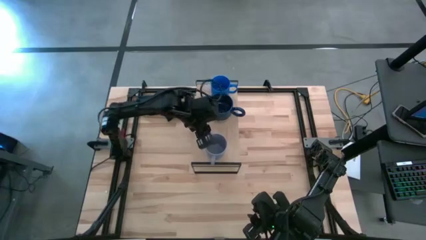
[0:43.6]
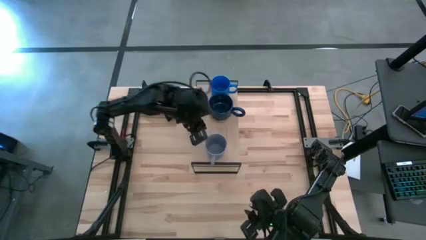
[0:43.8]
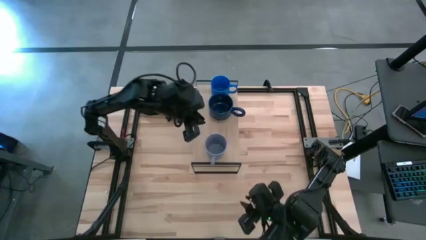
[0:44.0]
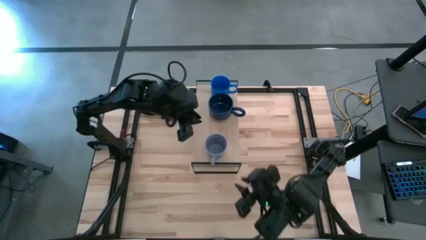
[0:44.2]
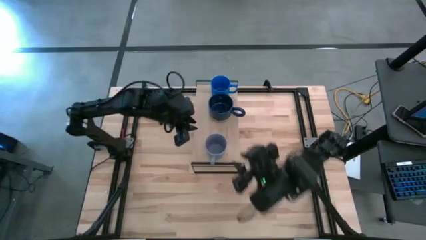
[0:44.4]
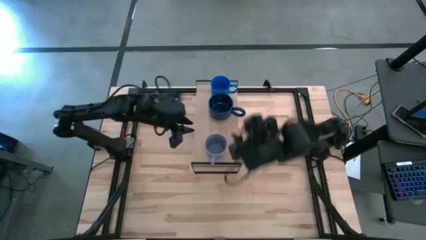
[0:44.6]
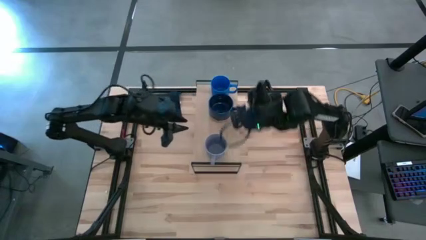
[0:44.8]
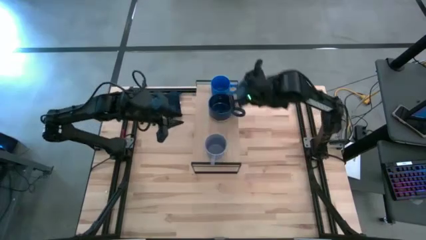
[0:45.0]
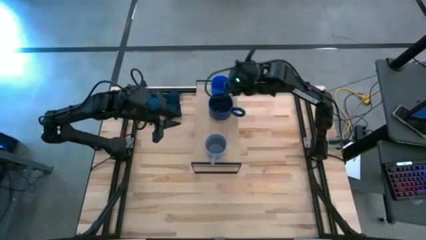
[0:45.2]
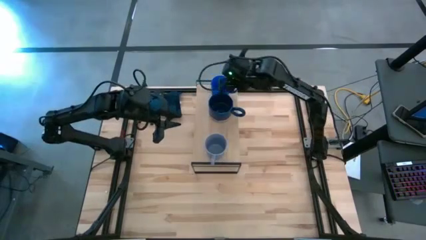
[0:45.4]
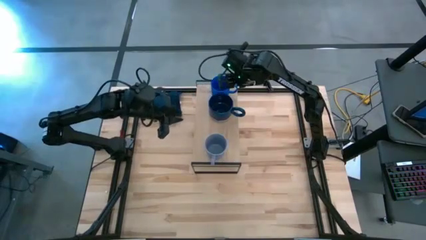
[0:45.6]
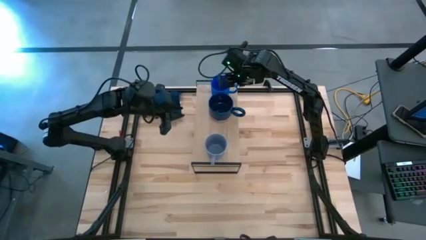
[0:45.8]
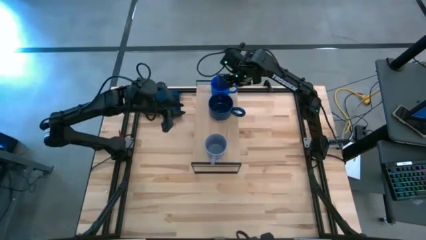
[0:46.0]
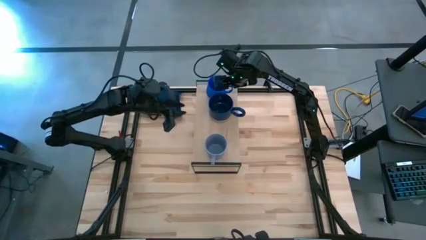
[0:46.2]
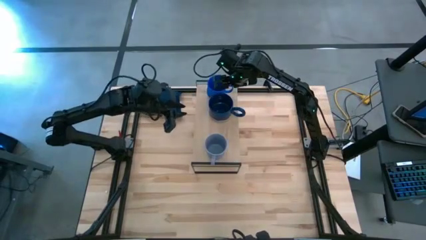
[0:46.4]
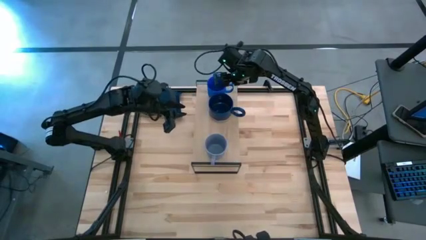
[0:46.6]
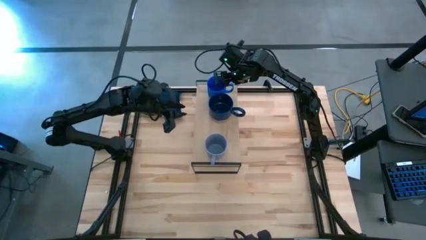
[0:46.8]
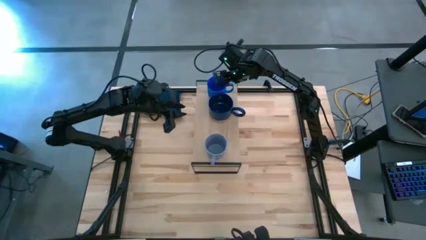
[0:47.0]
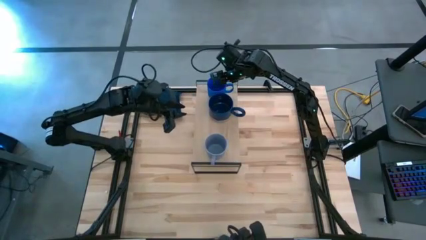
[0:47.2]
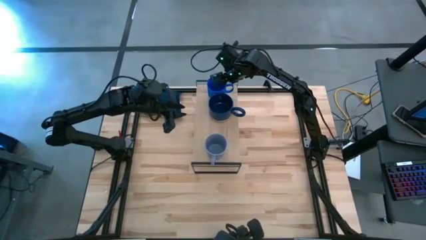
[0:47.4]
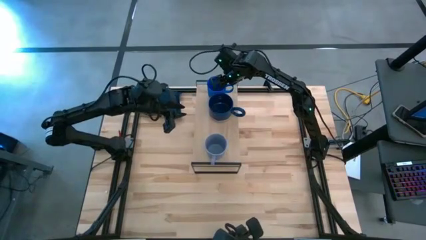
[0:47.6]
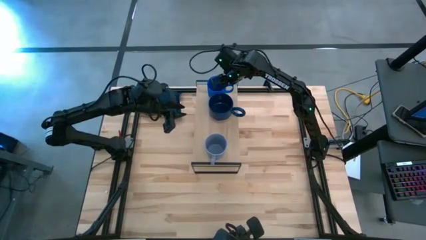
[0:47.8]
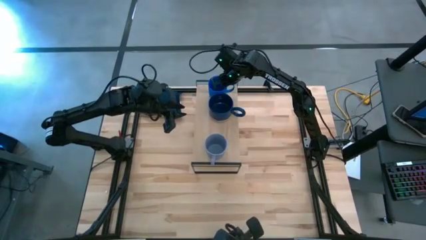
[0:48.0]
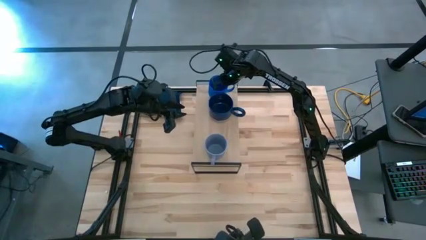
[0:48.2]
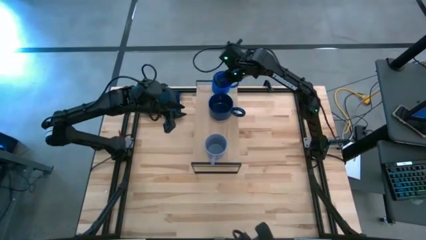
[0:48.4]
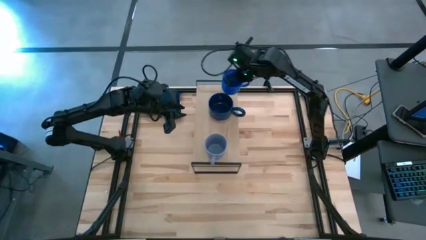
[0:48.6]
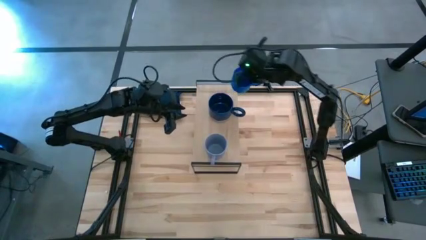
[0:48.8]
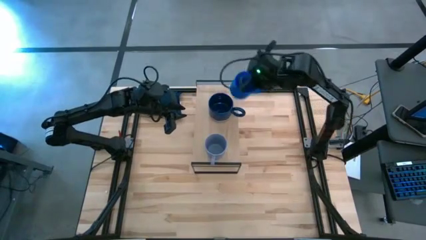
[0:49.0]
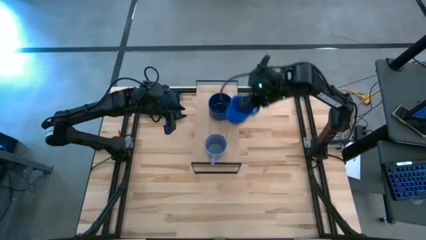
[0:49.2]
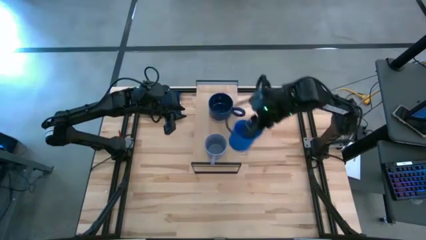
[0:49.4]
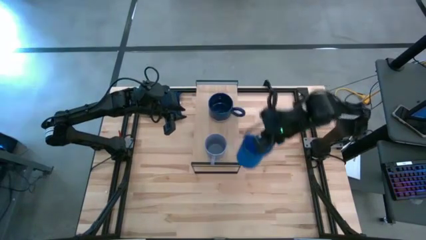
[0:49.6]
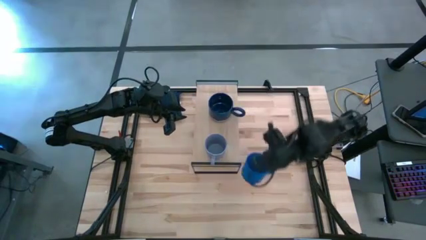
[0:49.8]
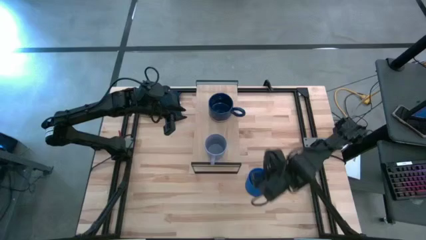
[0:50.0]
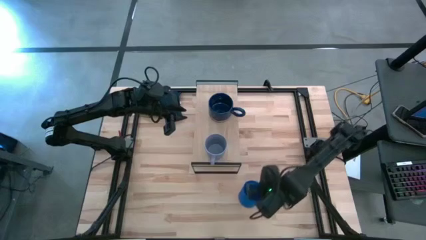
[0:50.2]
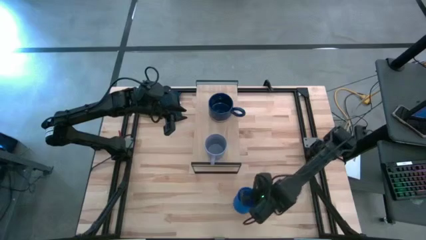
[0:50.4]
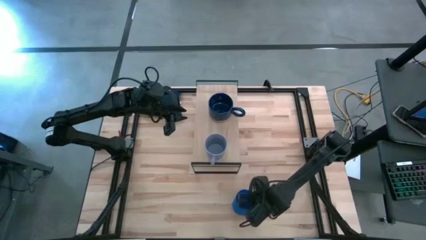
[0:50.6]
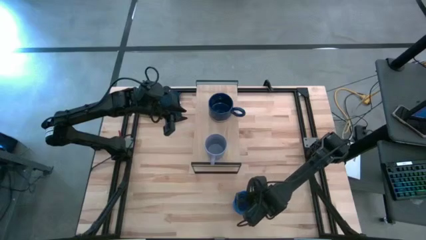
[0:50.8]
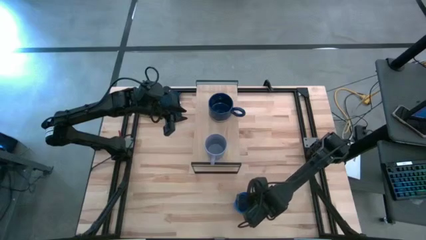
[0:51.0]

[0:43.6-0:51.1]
Task: Stack small to large cups/mugs on shelf
Remove the blue mug from the shelf

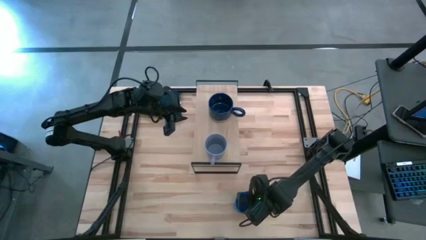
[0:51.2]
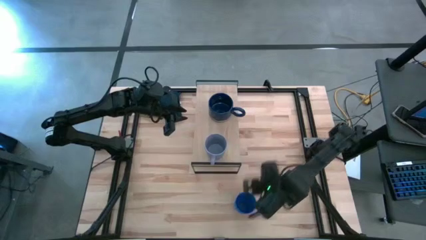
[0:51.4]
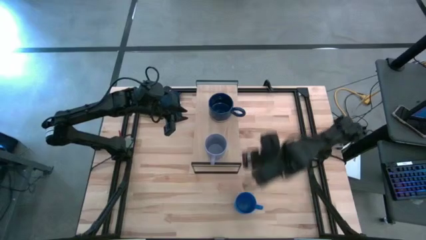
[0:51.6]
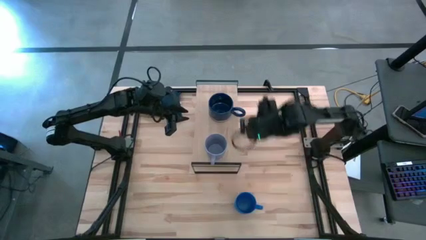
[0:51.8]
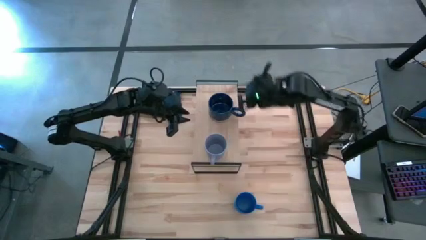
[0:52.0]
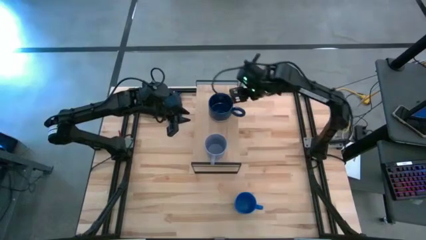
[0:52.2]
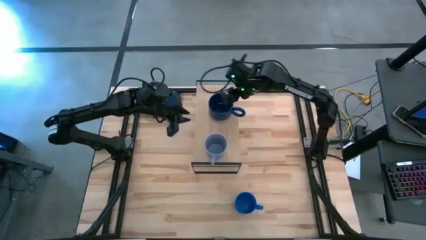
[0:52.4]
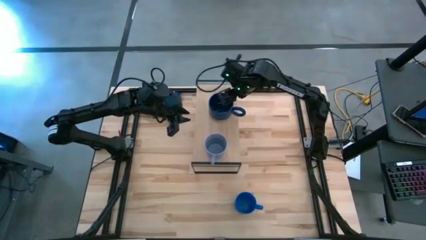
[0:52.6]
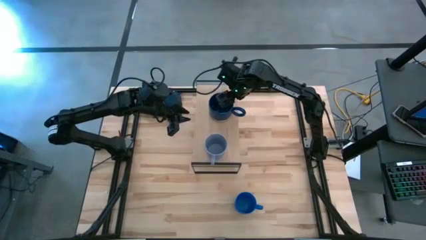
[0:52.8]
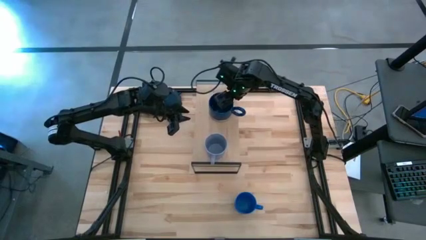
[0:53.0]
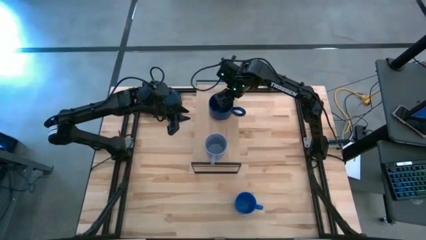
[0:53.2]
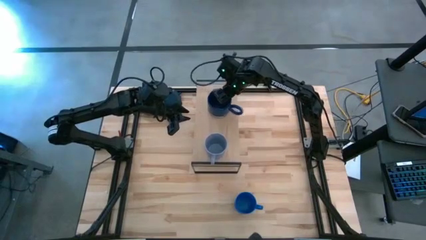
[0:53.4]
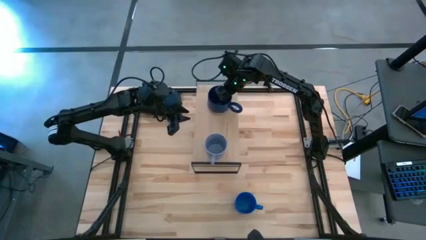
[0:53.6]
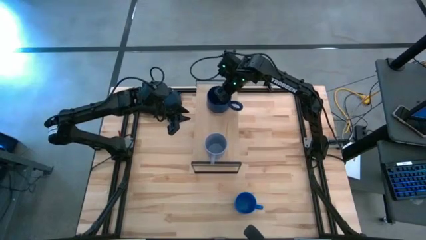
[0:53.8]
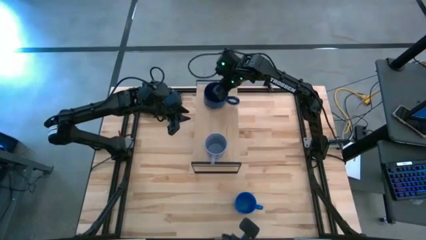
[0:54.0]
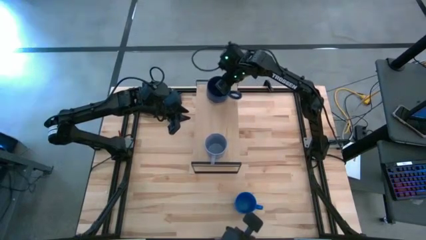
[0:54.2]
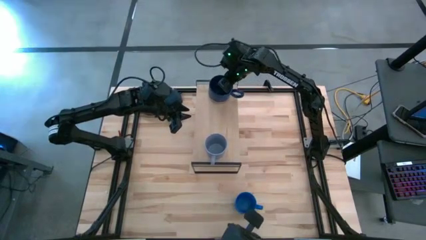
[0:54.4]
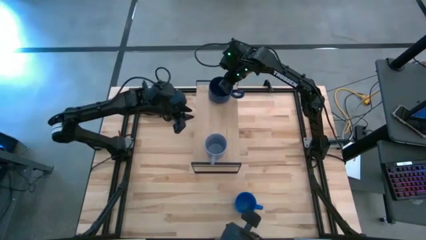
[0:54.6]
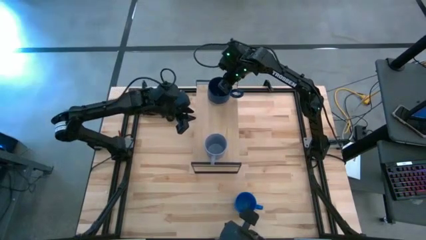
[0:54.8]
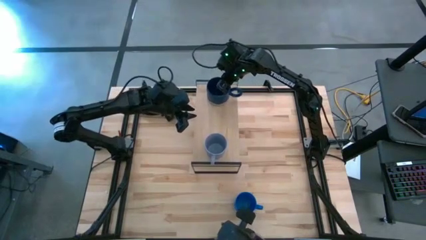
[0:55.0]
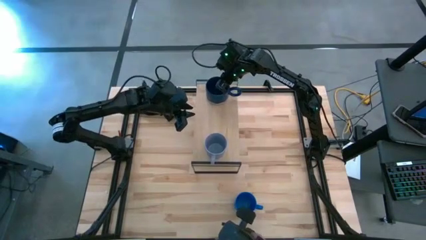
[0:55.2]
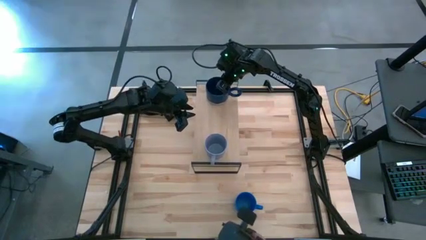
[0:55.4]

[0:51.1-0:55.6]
Adjust the blue mug on the shelf

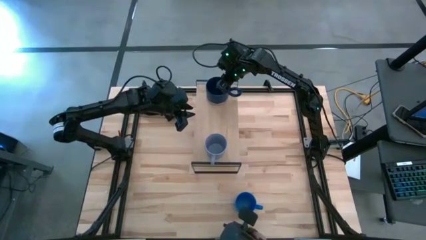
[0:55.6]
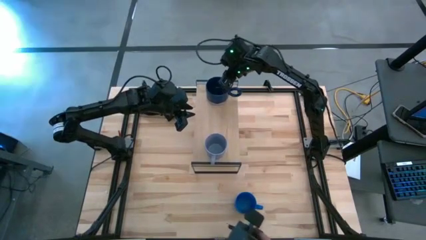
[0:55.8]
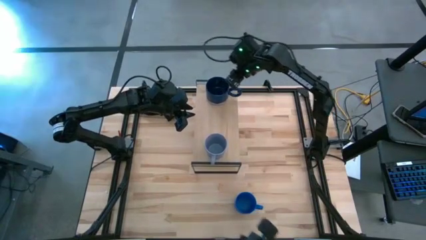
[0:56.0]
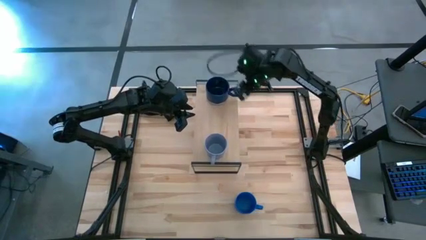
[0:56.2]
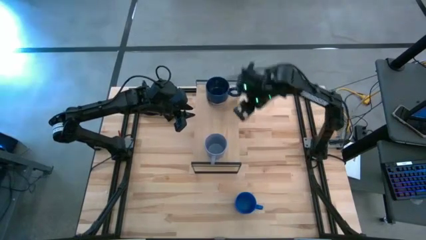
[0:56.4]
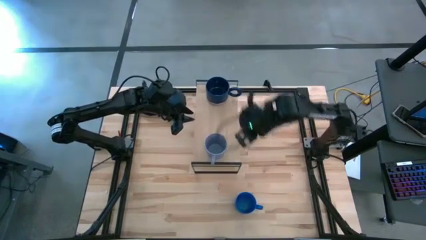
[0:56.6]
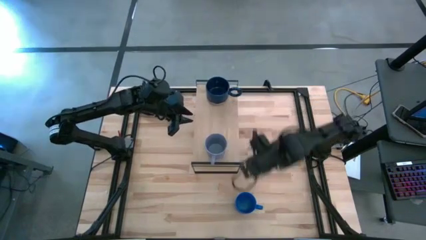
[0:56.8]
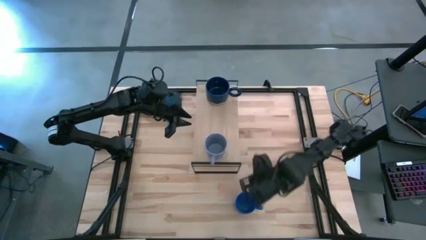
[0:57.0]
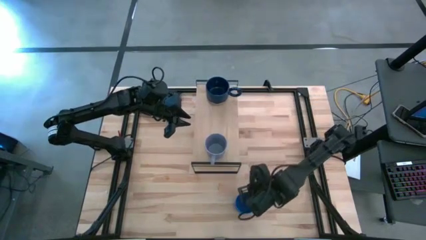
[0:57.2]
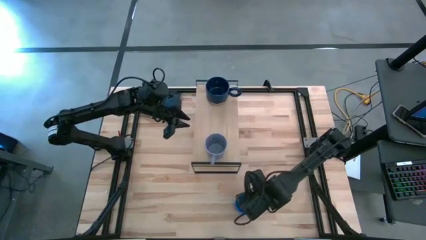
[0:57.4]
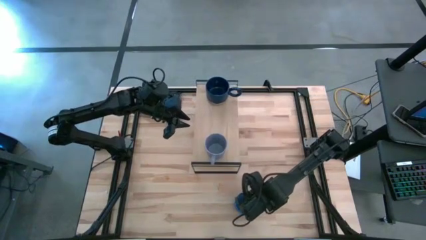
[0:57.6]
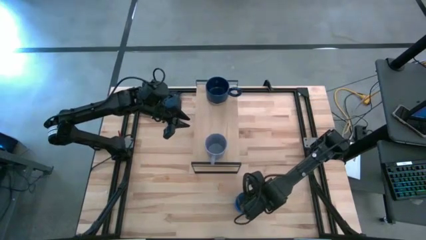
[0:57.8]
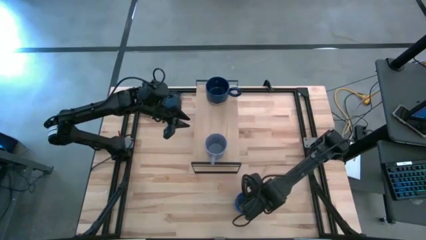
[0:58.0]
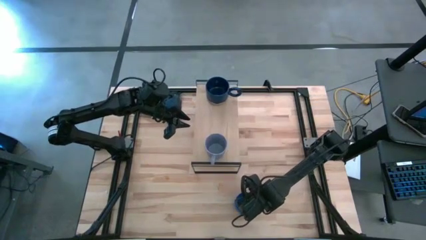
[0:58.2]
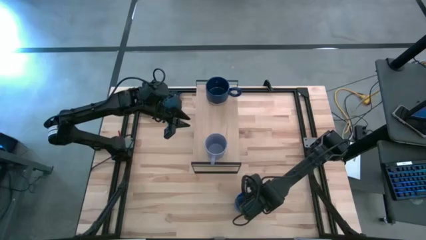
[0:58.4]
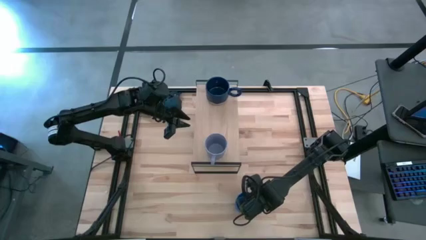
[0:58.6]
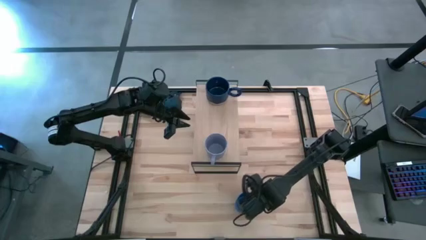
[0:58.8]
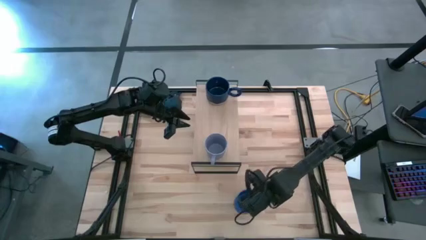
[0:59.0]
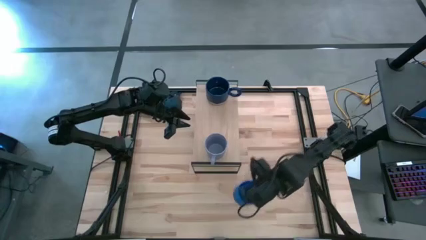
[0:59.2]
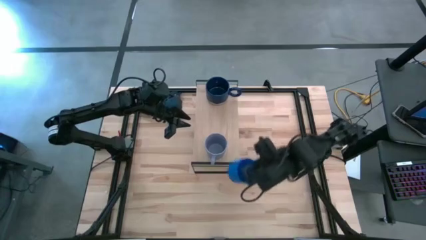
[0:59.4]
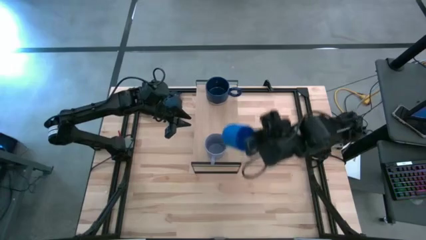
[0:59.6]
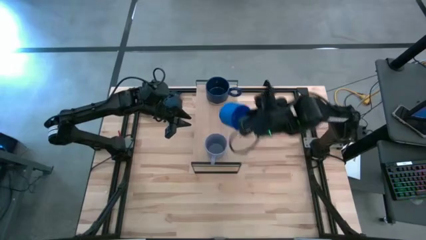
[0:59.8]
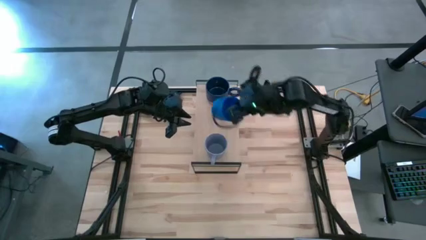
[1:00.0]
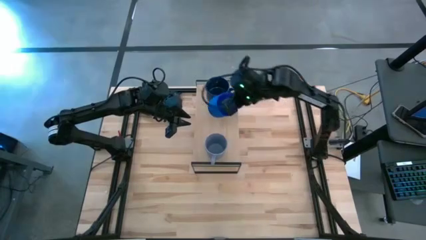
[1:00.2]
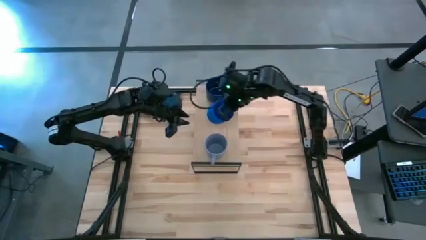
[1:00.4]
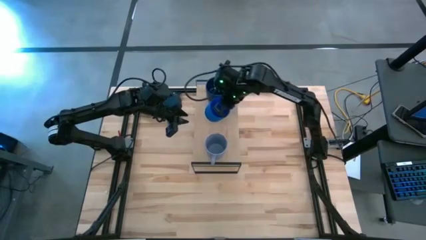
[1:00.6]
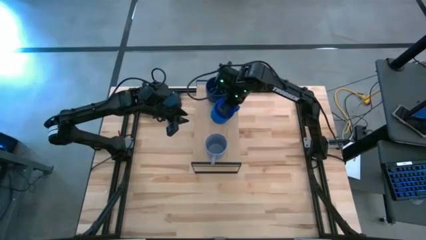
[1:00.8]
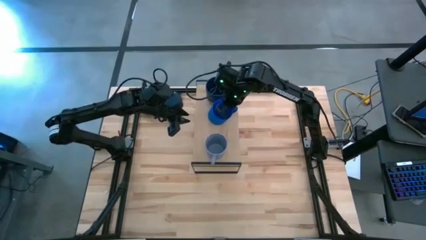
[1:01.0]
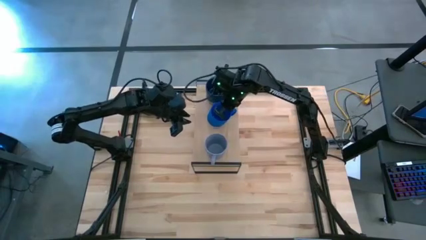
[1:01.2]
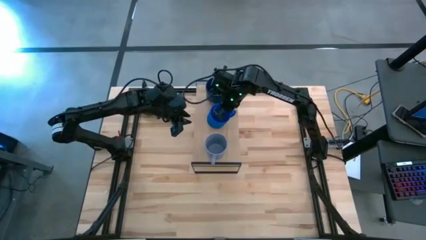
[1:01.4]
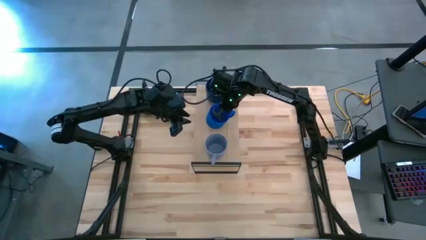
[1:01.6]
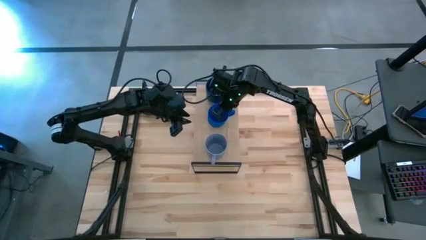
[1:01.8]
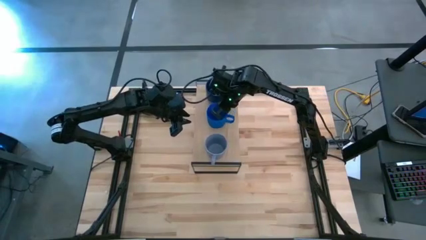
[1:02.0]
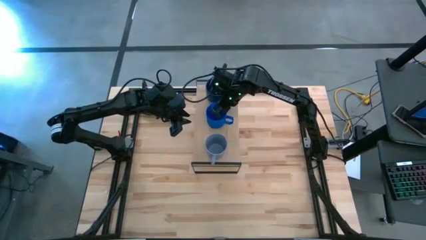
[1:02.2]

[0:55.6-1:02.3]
Put the blue mug on the shelf
